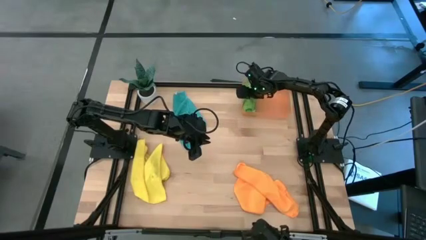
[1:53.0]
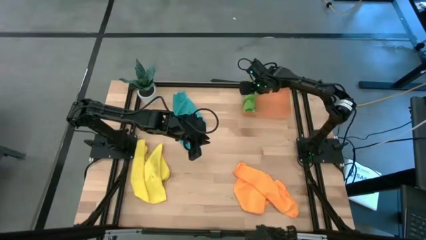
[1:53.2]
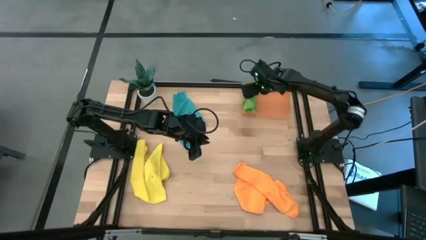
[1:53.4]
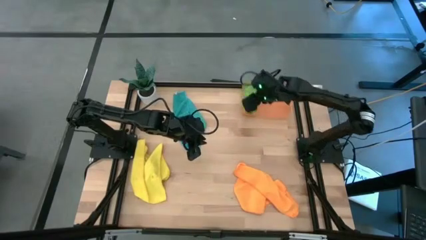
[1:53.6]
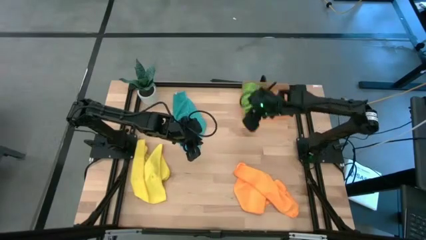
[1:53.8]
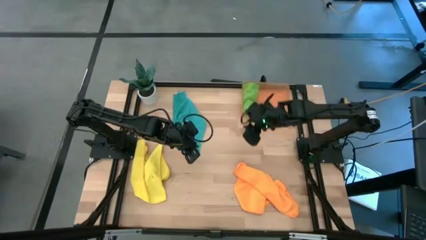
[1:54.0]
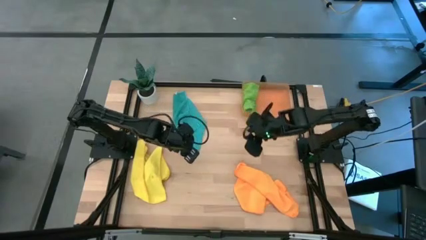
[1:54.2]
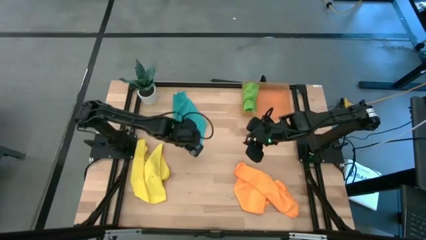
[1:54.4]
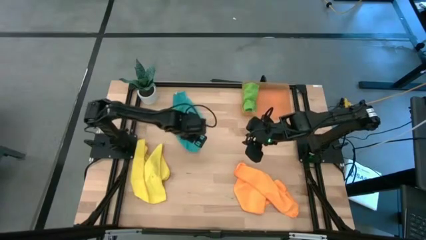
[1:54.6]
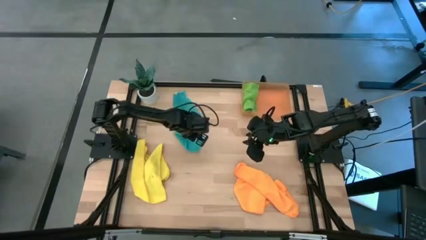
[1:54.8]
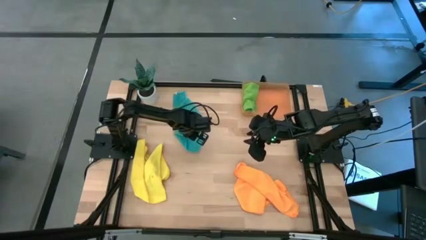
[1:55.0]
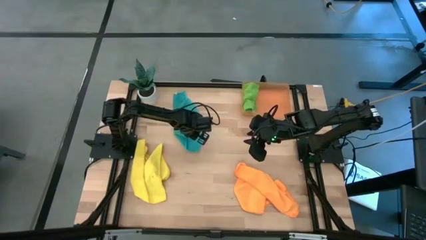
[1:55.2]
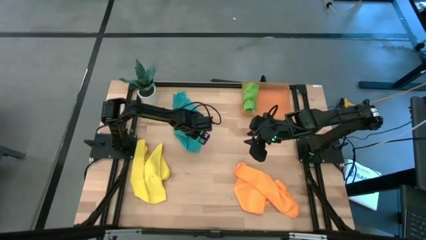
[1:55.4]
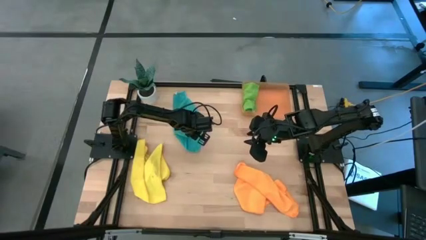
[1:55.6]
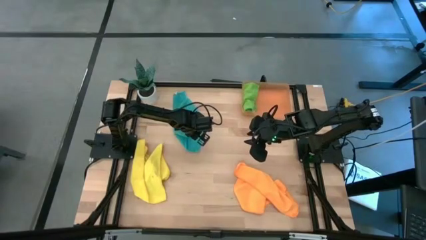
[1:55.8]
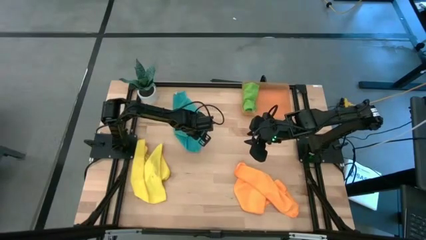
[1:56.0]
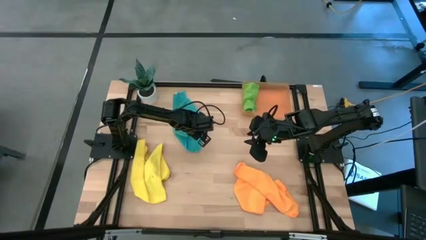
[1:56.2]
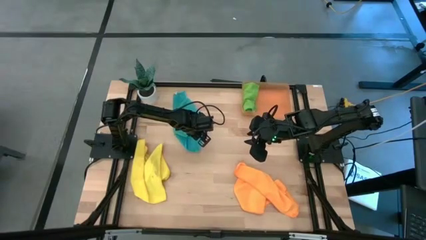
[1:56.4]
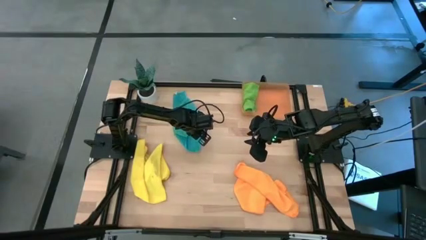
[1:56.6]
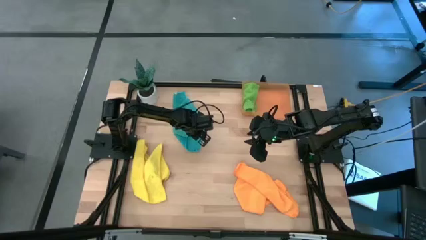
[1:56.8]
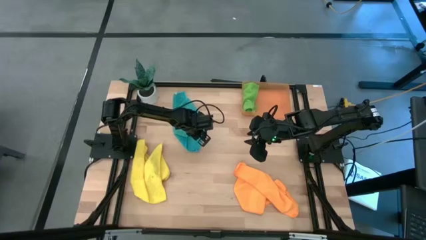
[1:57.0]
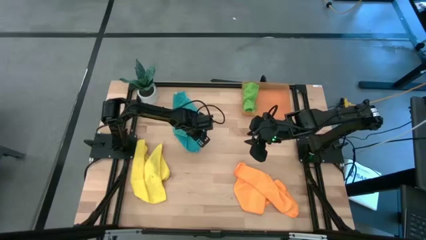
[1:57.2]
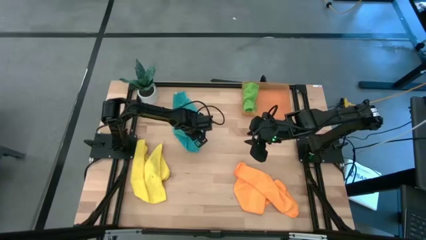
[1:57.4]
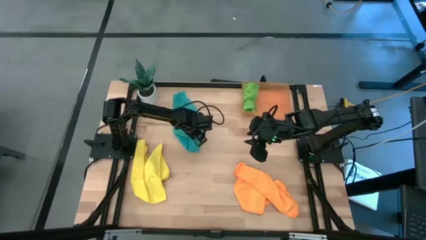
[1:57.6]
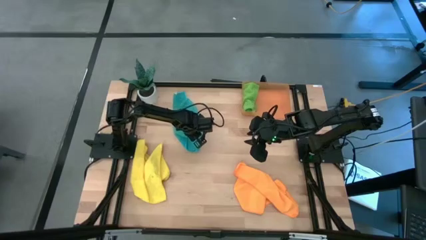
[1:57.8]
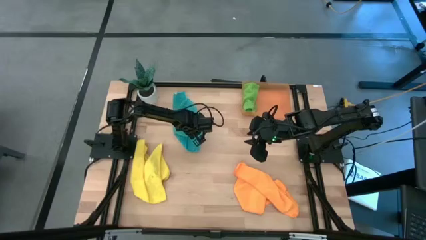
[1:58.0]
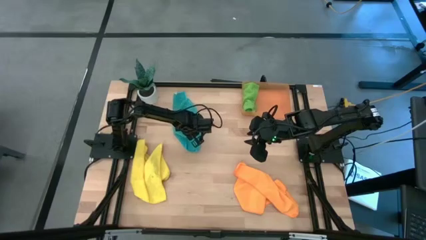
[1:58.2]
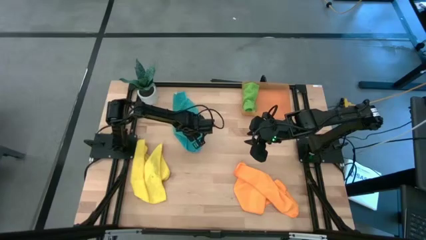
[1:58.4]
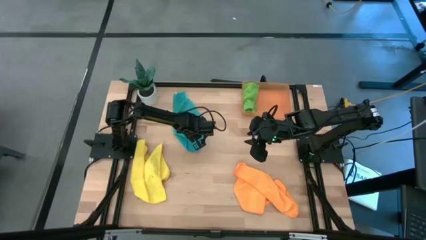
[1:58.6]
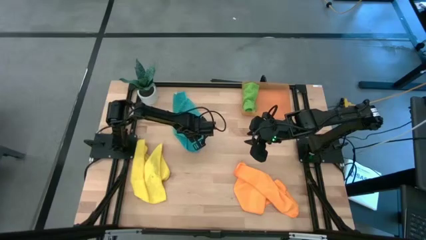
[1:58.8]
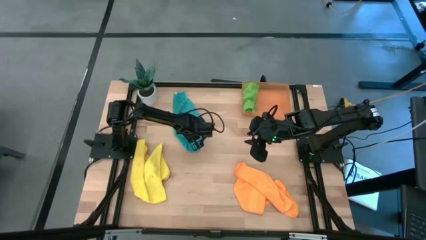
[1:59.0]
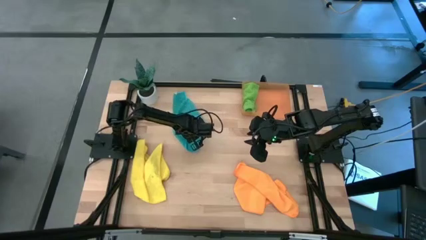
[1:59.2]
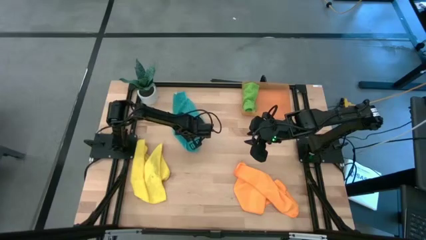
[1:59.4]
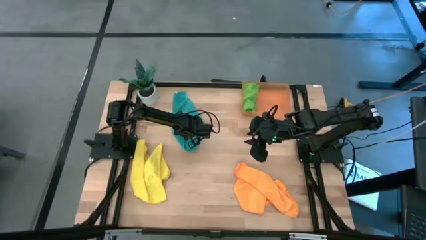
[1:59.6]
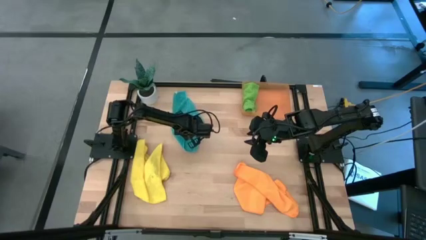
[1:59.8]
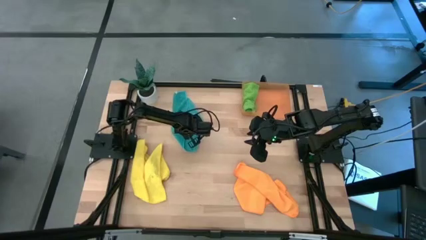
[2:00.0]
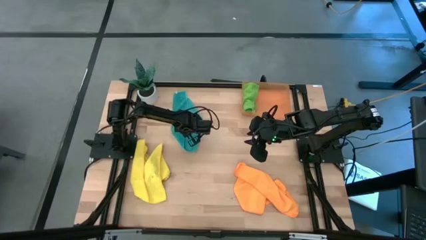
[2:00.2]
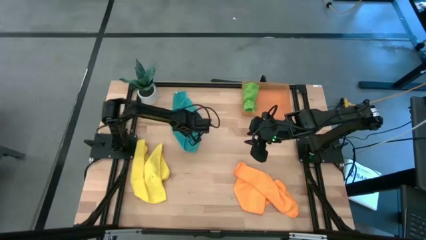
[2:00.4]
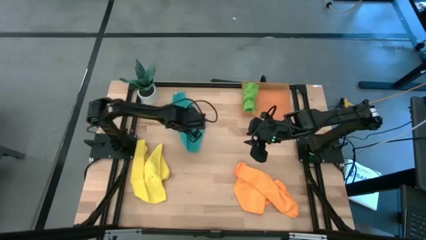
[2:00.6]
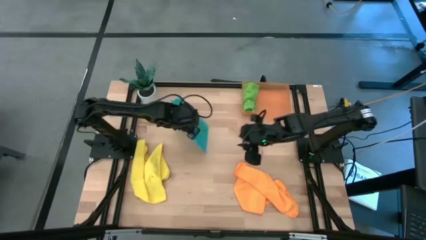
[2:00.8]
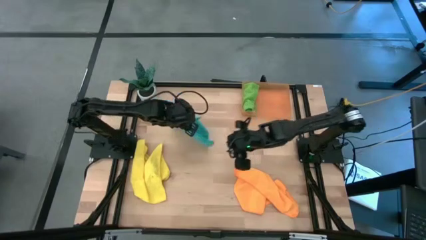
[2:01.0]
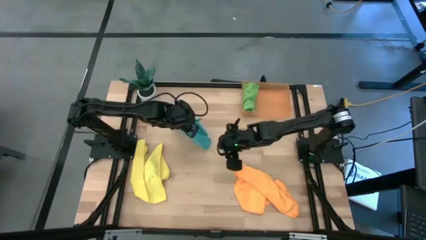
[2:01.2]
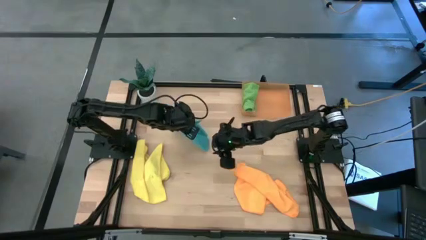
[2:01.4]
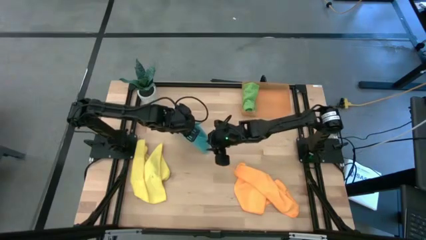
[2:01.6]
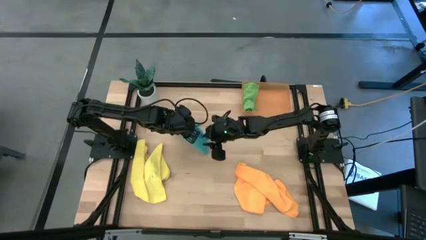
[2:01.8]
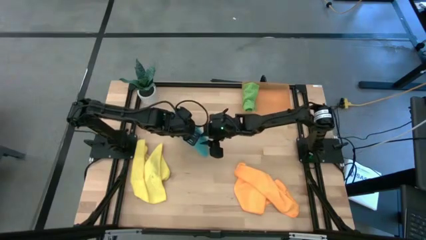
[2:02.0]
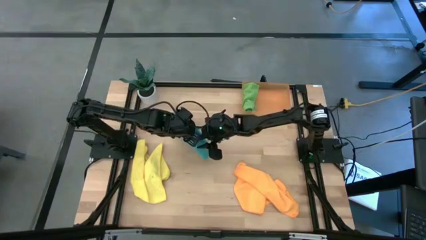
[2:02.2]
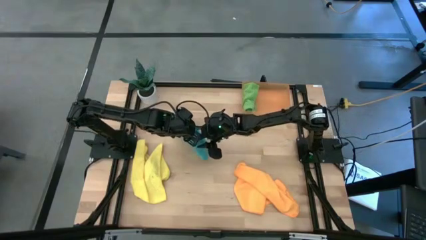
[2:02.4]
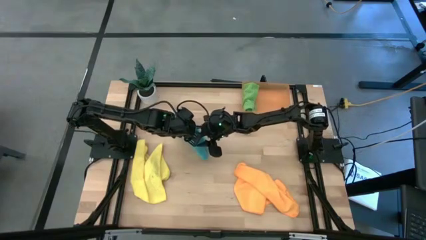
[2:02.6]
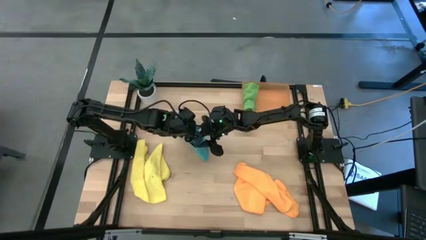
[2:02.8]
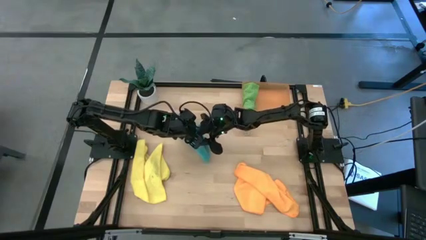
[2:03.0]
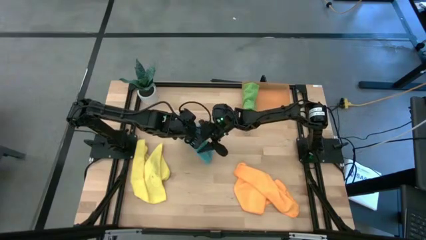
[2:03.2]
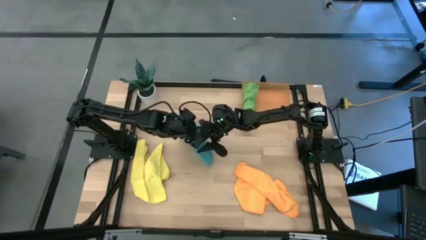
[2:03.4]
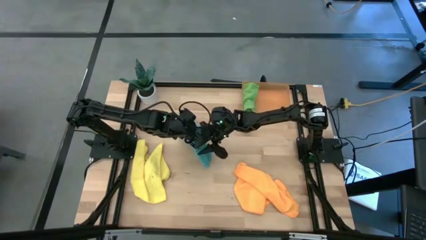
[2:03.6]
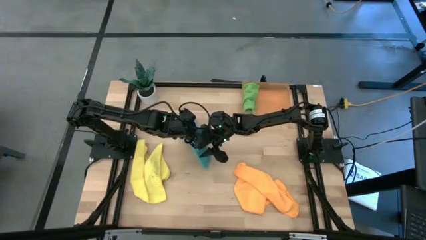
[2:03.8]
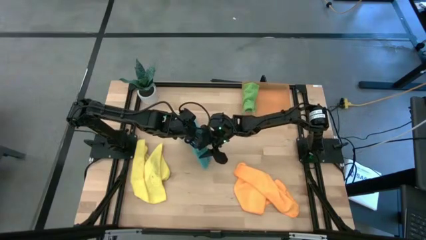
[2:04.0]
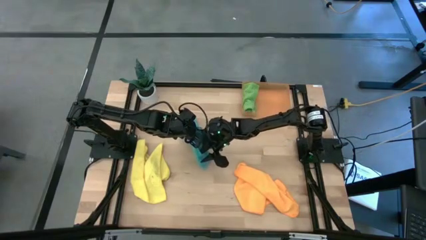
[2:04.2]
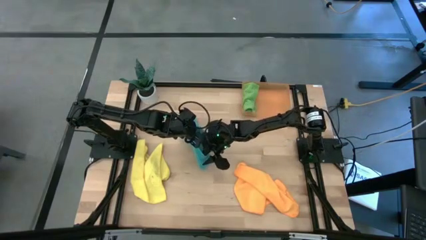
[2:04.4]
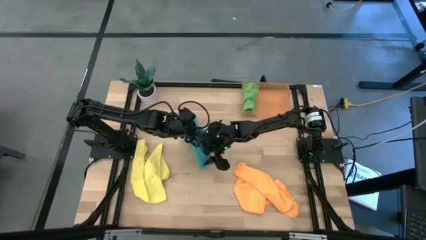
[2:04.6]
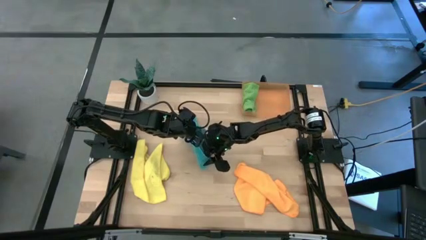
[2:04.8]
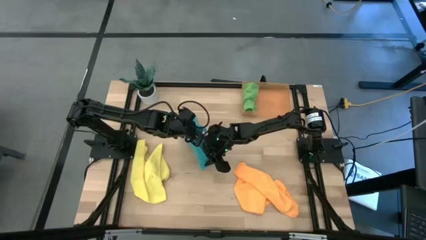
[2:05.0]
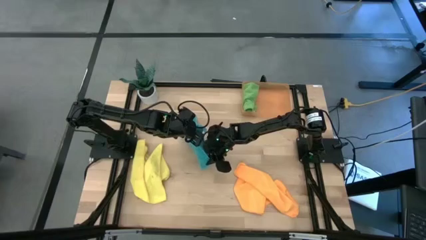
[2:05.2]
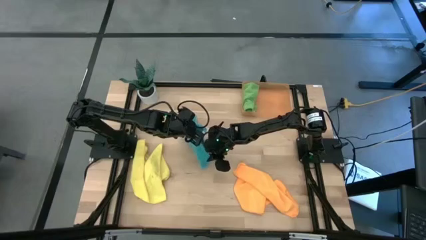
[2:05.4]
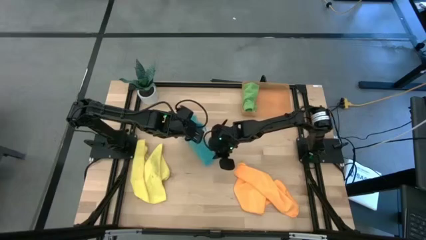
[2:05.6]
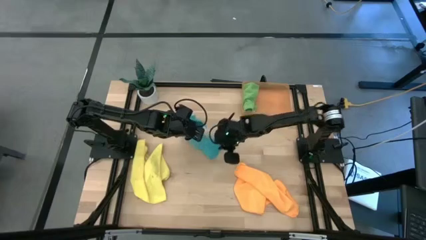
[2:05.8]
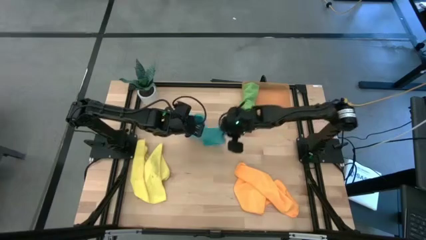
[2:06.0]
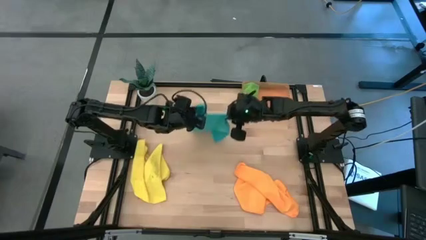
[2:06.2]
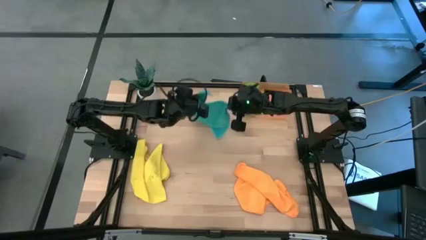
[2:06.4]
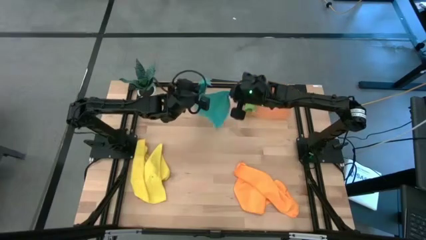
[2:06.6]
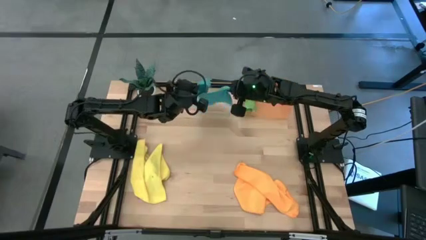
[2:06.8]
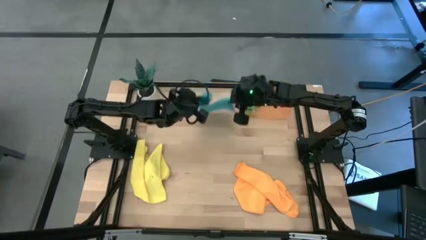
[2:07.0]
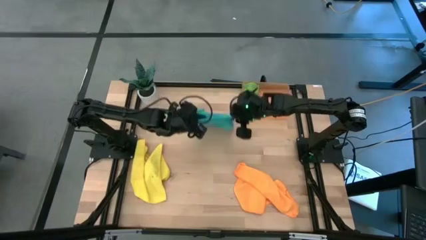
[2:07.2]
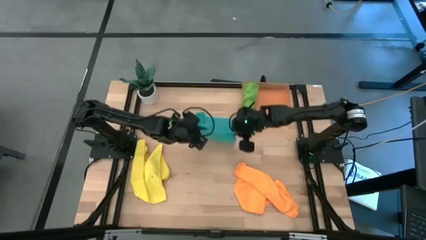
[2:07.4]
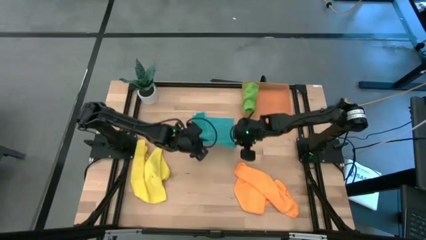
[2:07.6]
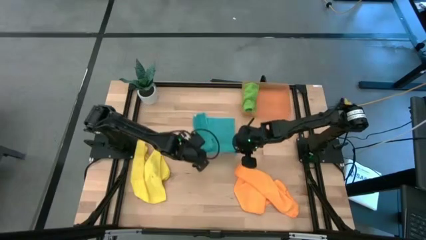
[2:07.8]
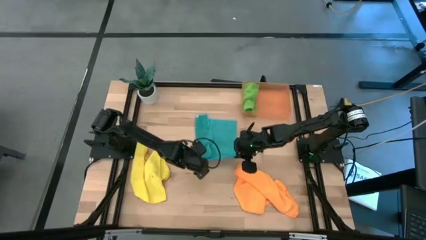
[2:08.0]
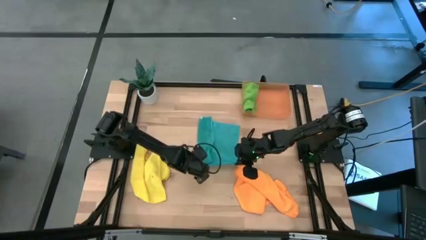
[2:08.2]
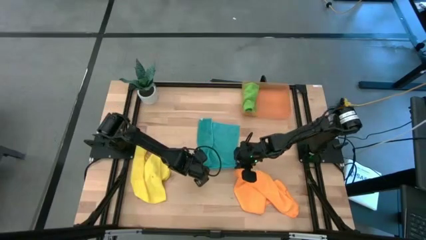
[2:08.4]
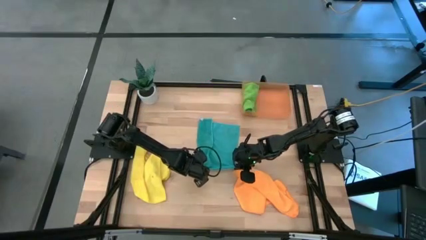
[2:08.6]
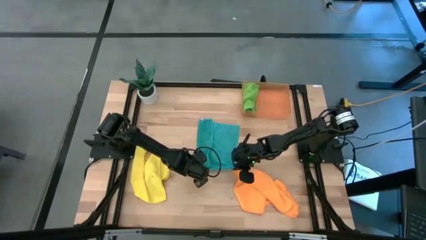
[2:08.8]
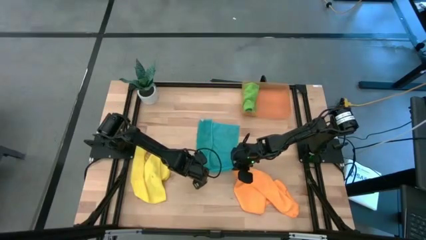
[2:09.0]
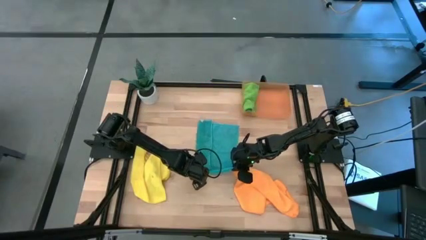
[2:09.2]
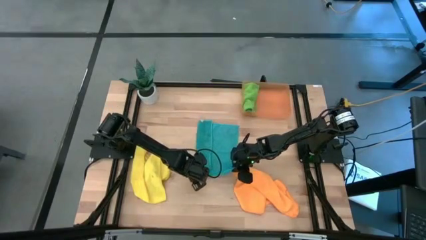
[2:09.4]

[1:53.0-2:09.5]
Task: Roll microfiber towels into tight, uniform cylinder then place into a basket
Fold the blue towel
